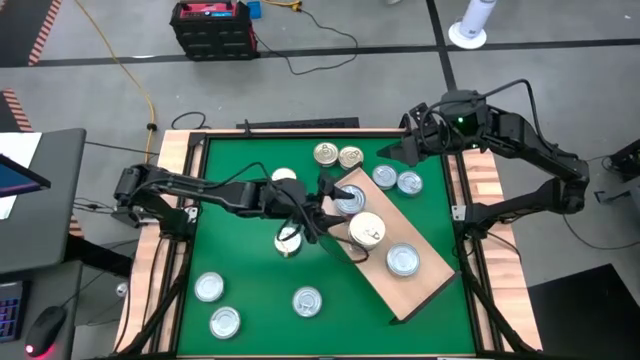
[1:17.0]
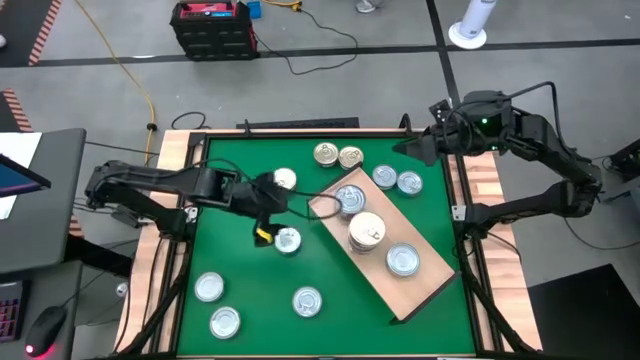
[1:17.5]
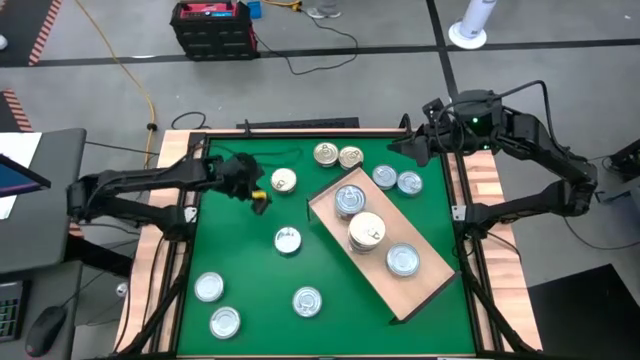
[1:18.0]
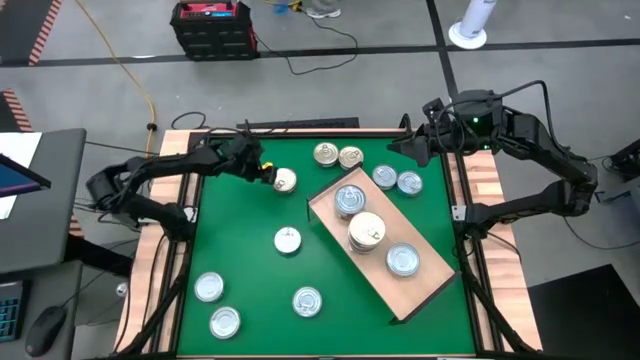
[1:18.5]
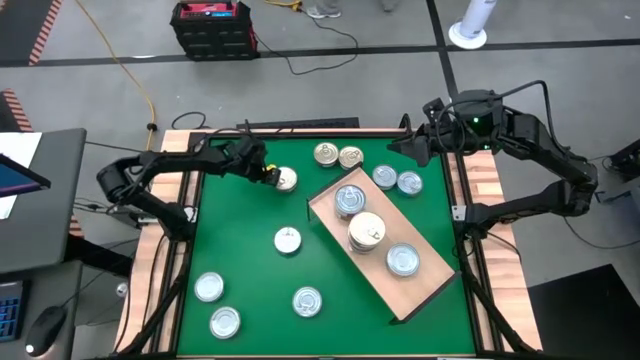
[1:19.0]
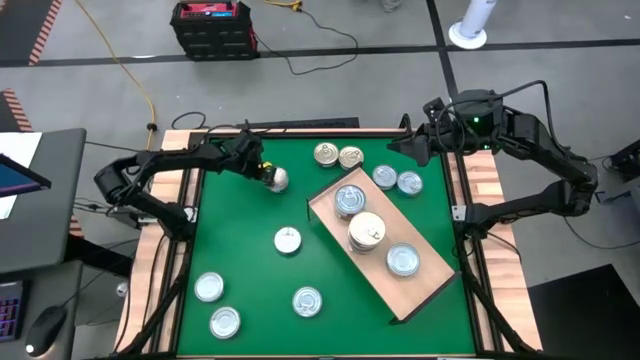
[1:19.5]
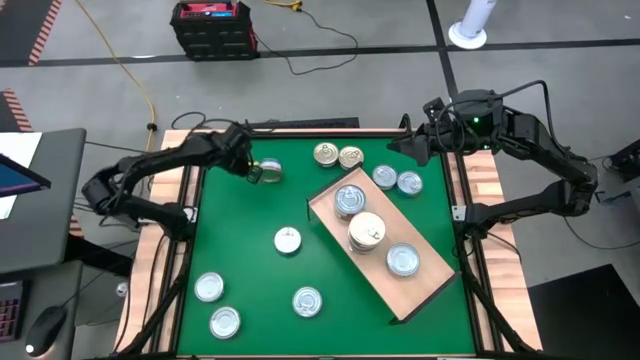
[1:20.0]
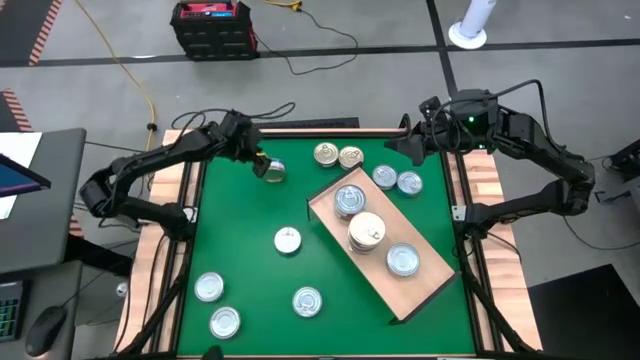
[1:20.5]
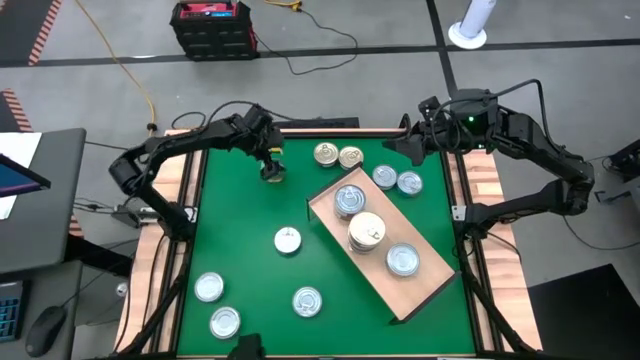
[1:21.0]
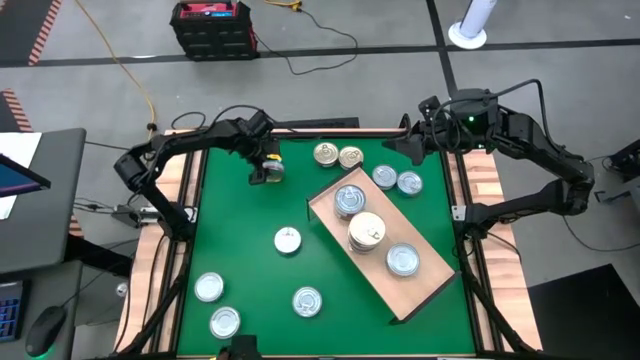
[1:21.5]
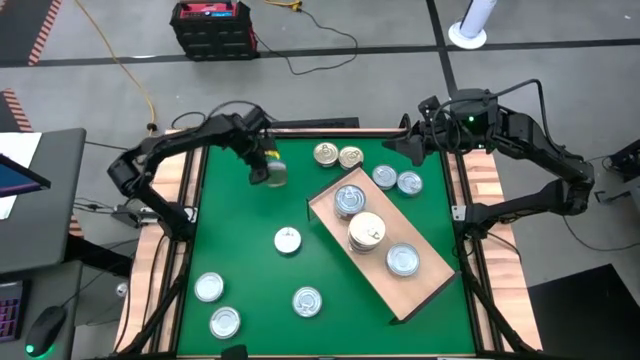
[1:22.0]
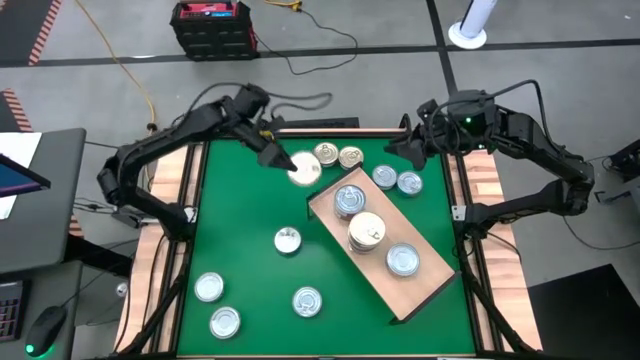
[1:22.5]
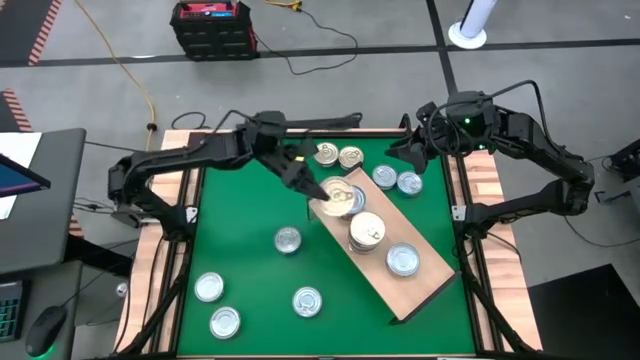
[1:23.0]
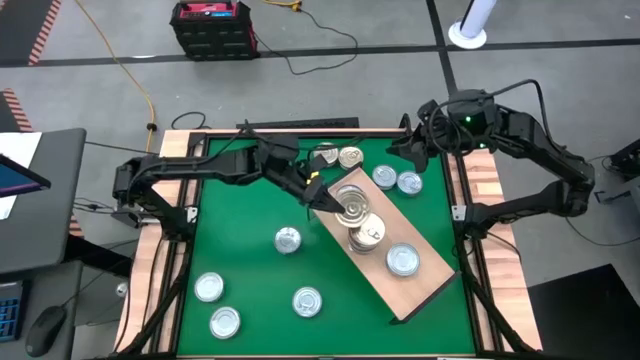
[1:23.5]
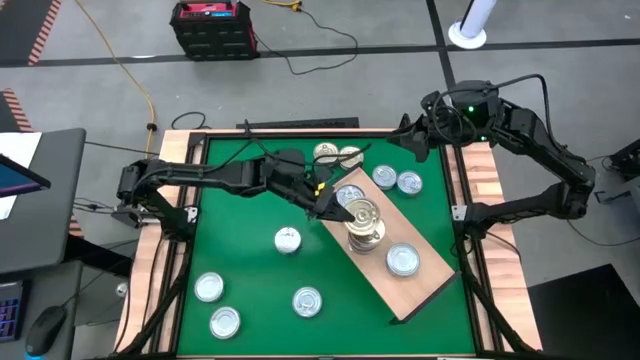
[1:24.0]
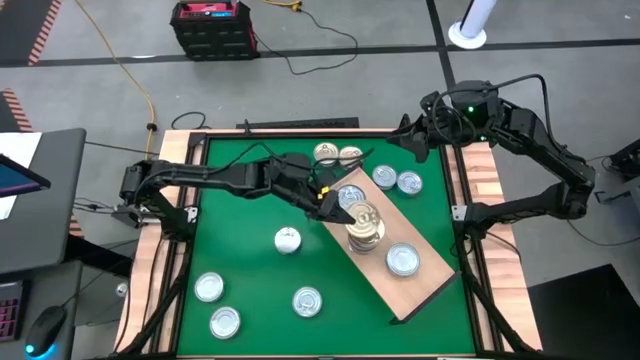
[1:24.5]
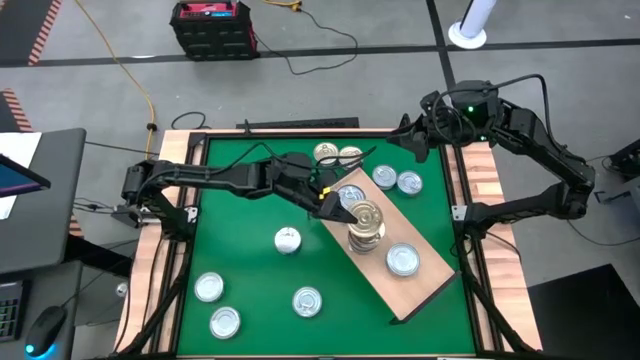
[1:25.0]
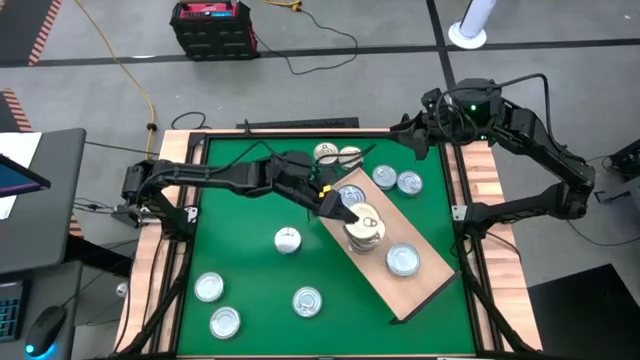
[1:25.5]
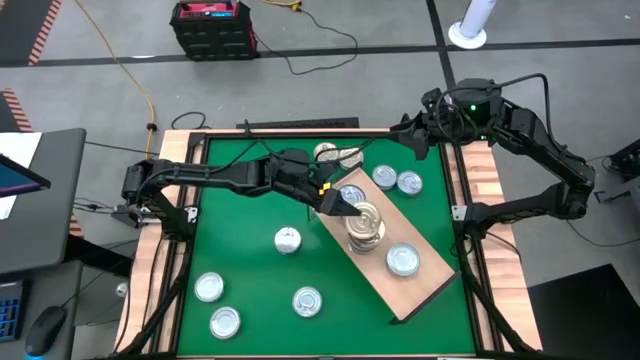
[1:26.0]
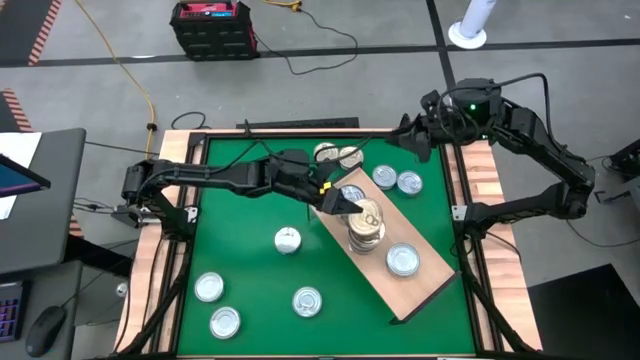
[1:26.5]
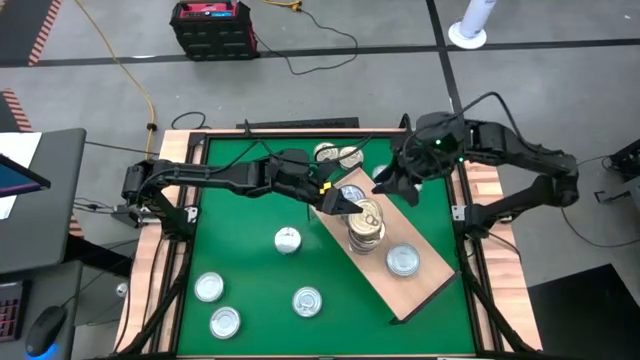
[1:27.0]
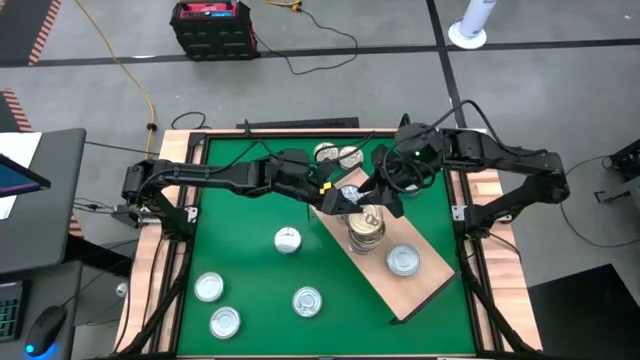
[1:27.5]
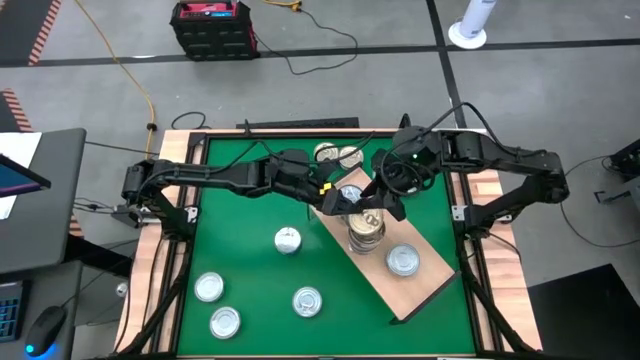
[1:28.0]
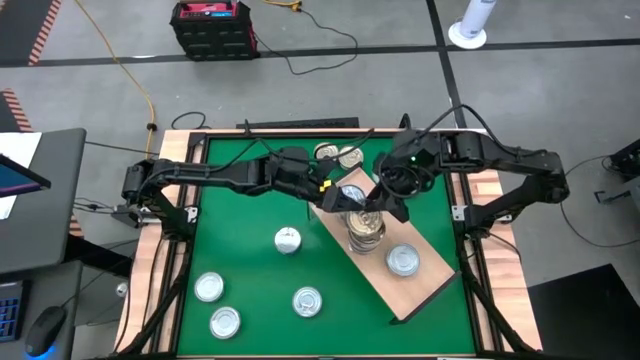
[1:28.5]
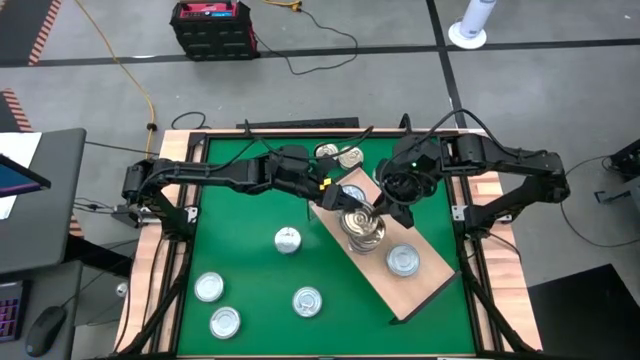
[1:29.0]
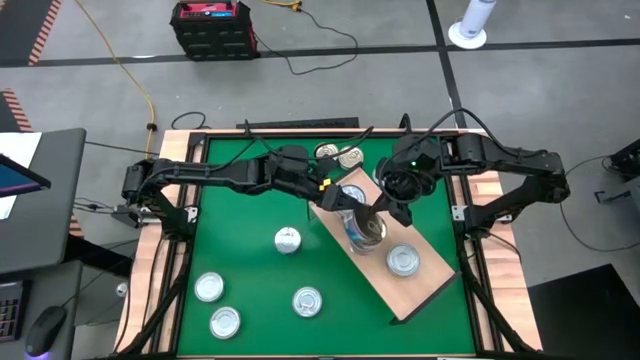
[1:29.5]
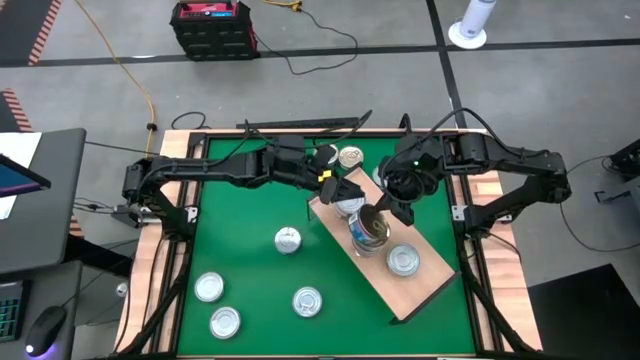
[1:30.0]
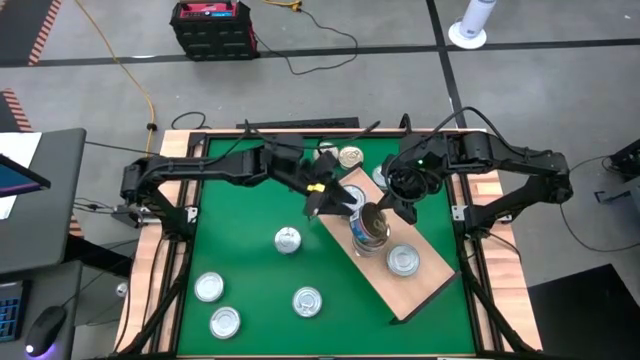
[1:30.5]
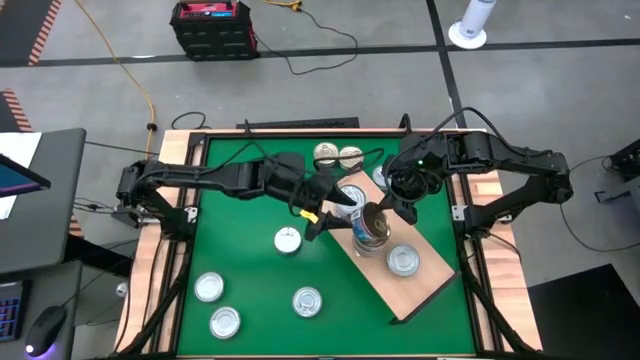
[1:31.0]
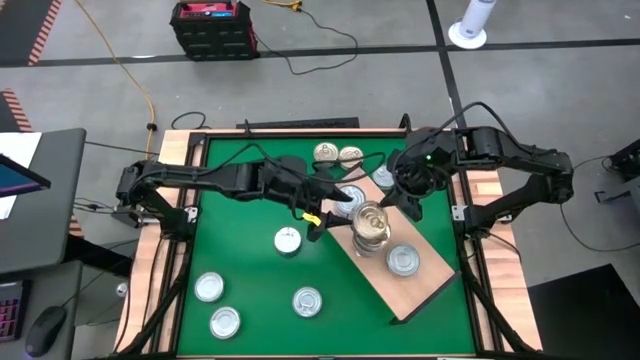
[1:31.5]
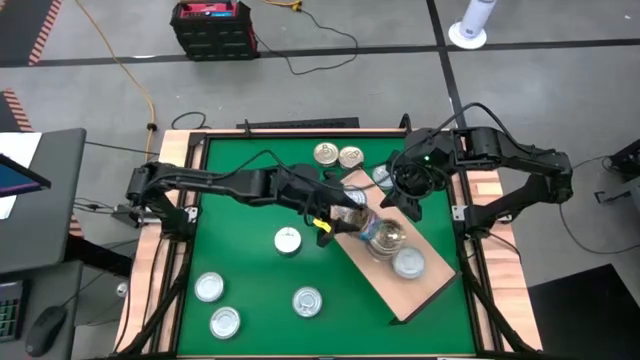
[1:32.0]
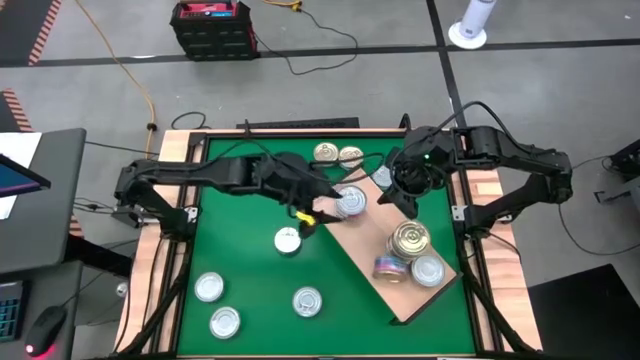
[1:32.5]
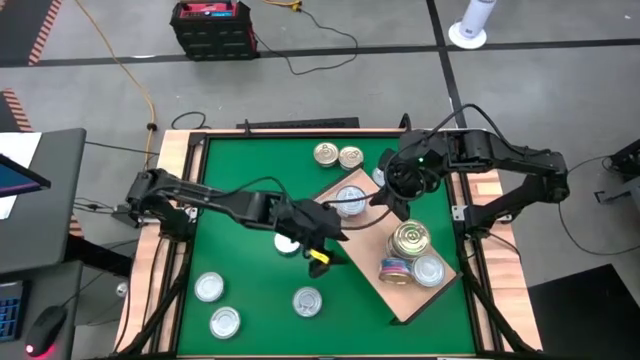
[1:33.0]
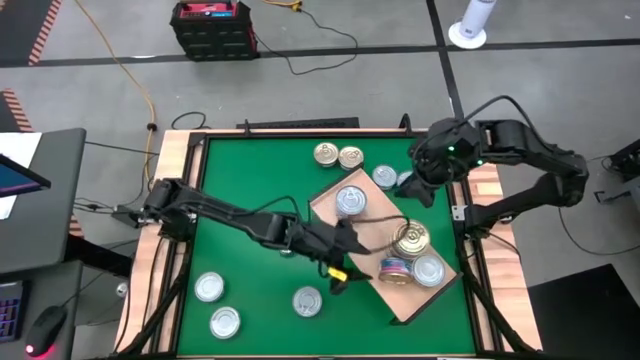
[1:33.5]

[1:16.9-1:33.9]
Task: Stack canned seafood by type on shelf
Stack the blue and pink tuna can on top of the other blue and pink tuna cans on the shelf

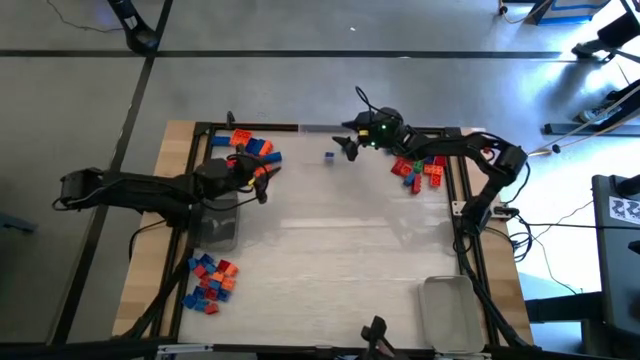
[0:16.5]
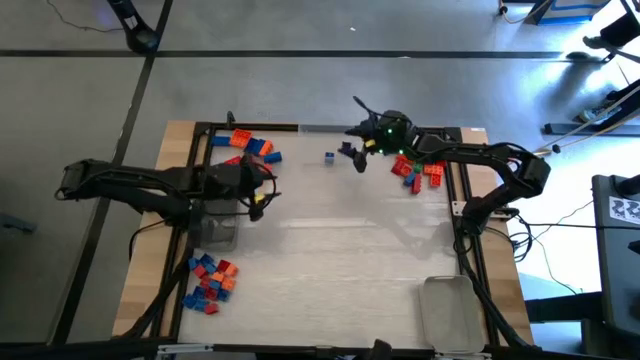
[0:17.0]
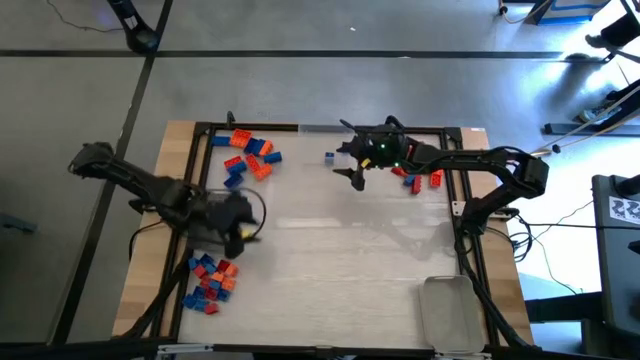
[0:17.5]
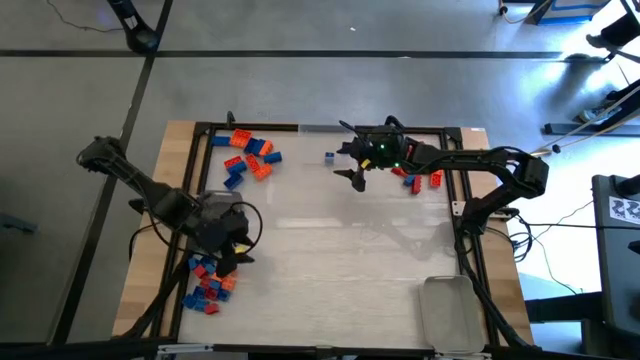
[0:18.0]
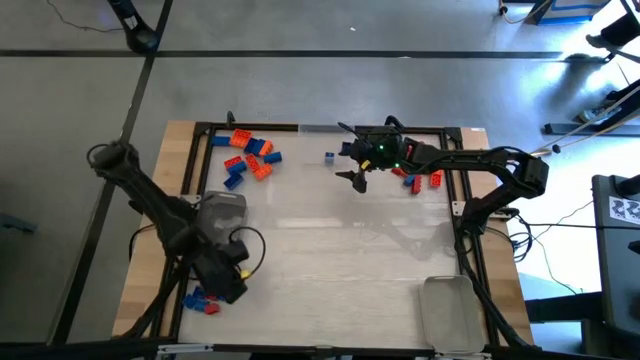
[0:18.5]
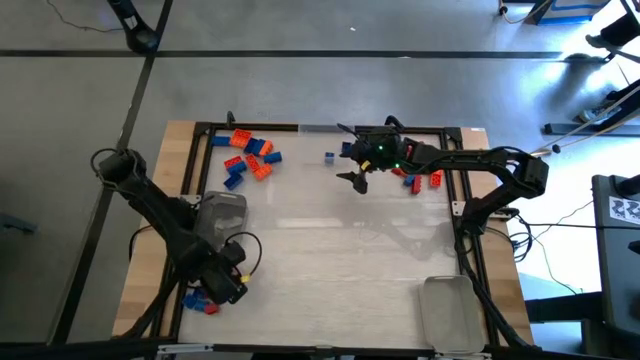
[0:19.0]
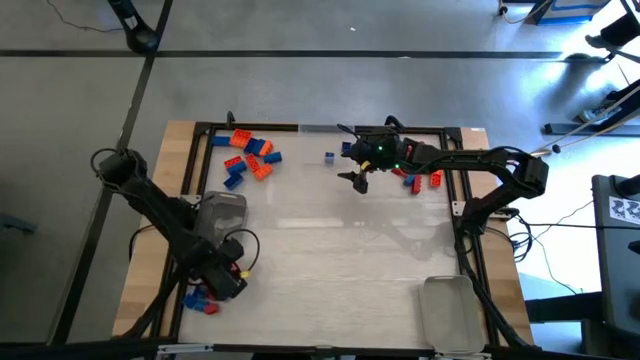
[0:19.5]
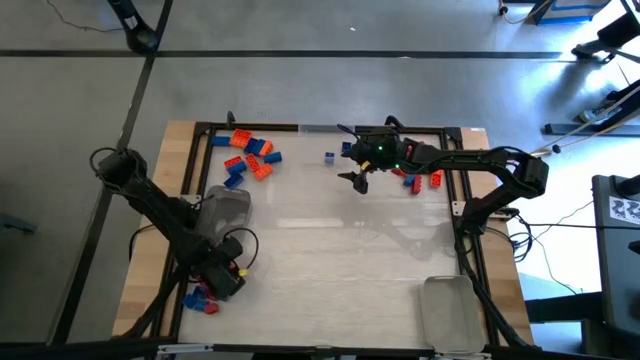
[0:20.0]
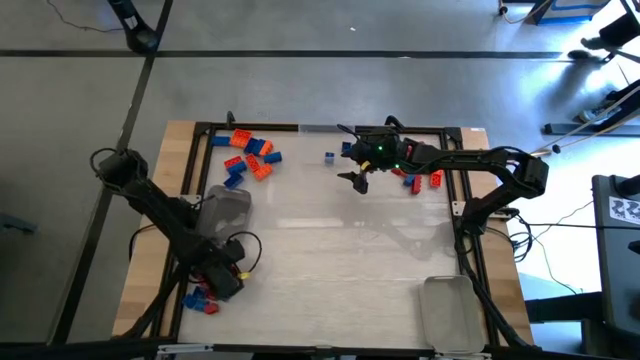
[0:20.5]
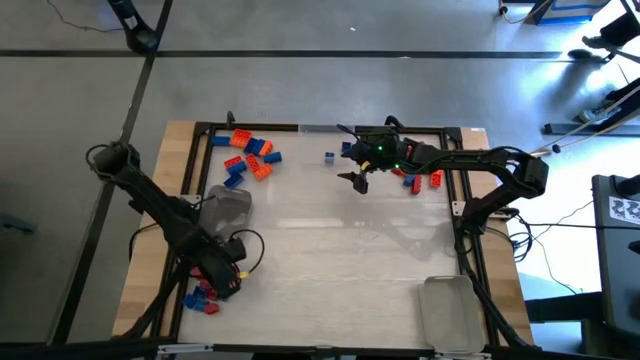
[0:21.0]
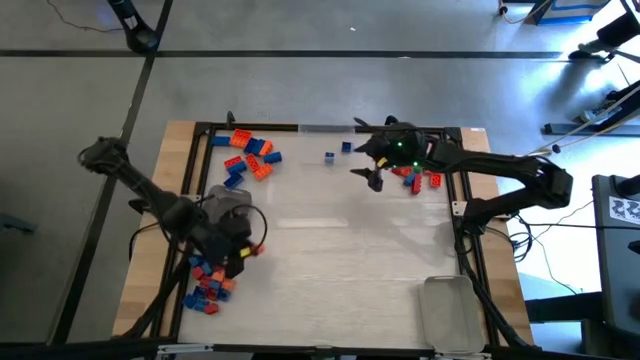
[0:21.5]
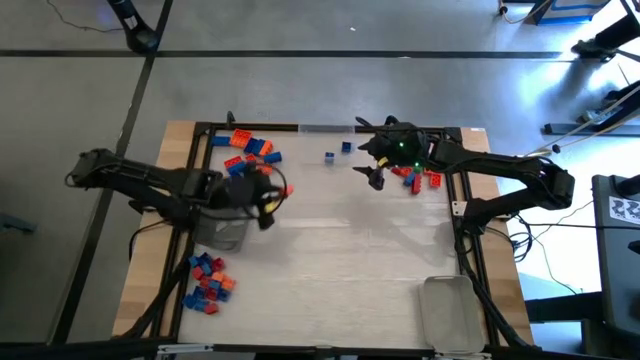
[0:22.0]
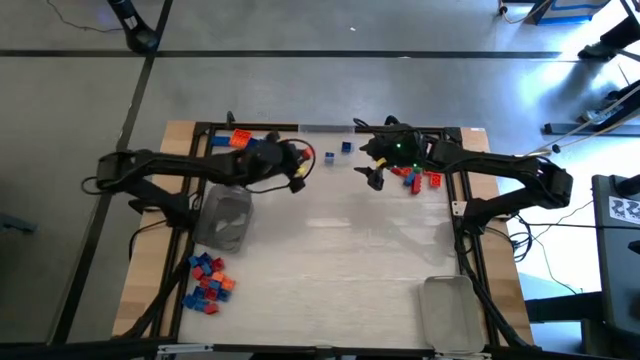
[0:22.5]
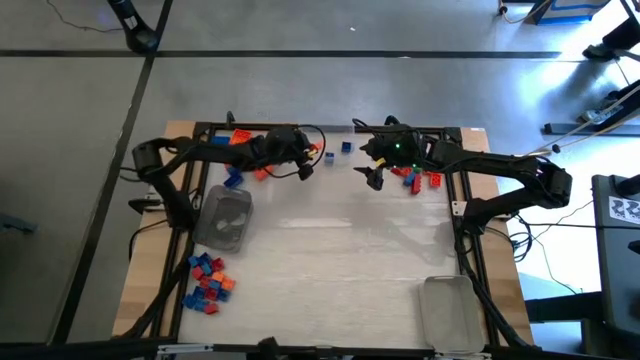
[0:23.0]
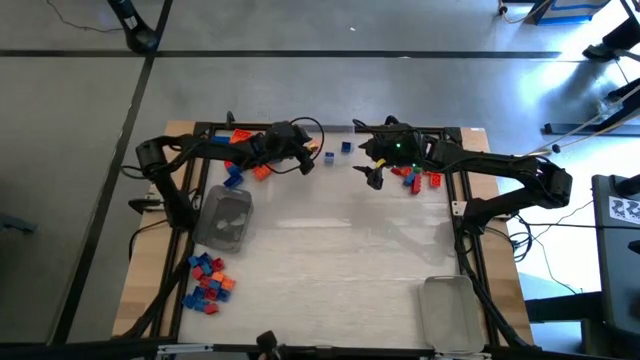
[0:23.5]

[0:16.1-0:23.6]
Task: Sort blocks by size
Put the orange 4 stud game piece into the transparent bin
